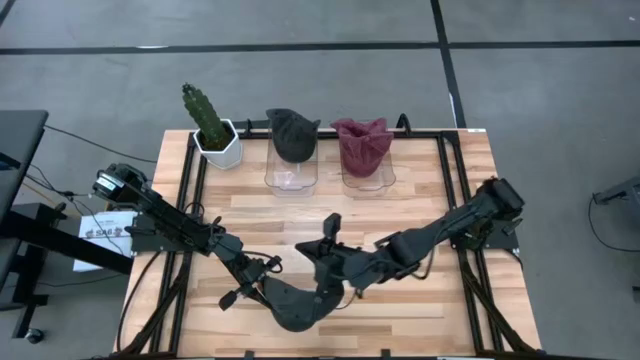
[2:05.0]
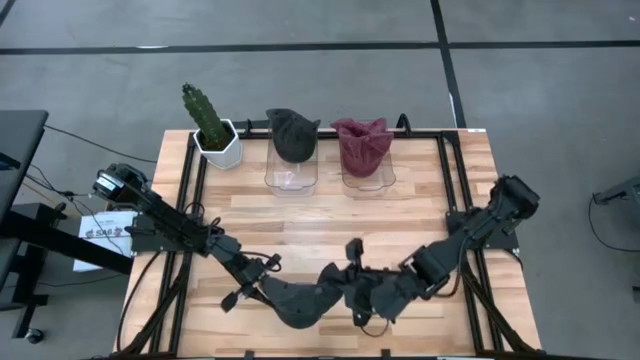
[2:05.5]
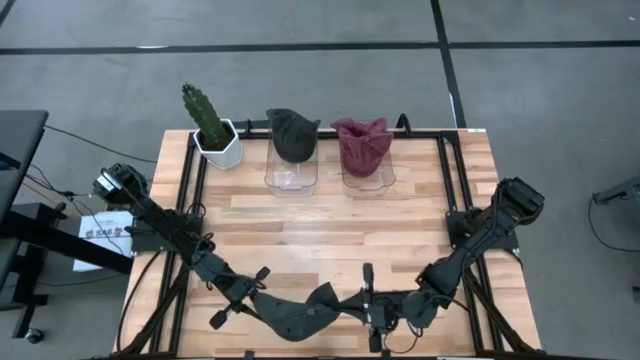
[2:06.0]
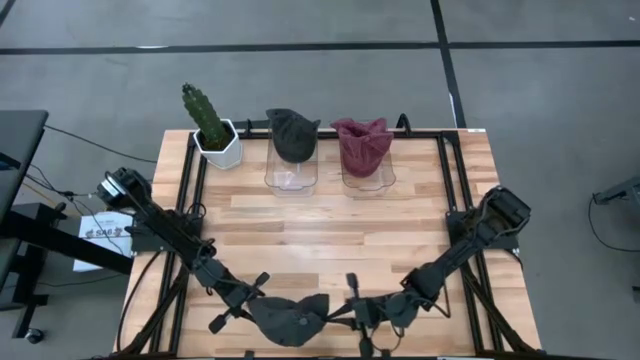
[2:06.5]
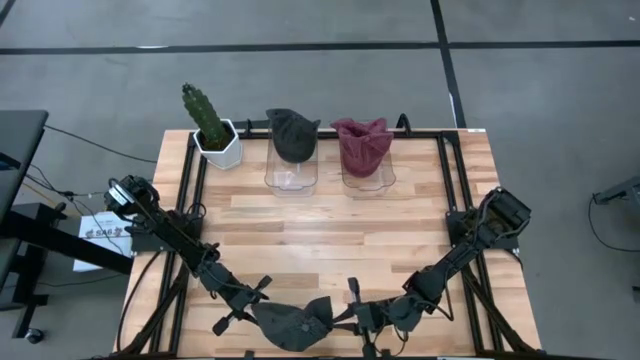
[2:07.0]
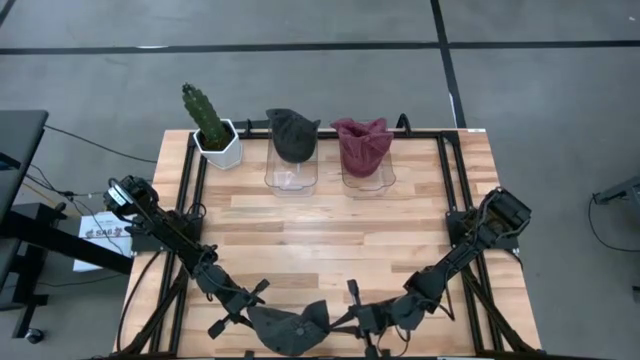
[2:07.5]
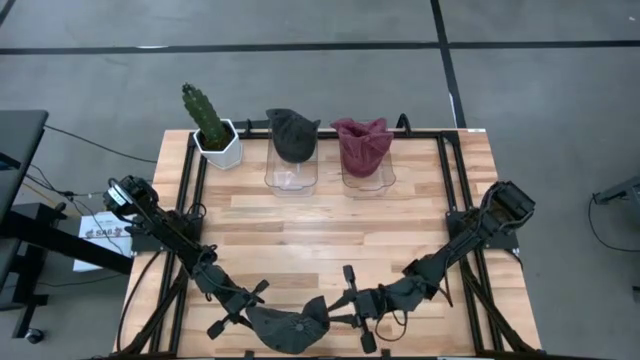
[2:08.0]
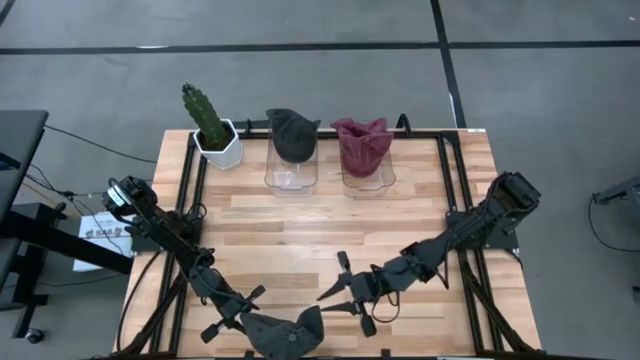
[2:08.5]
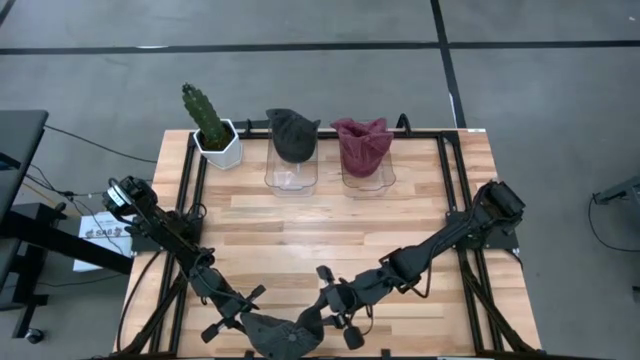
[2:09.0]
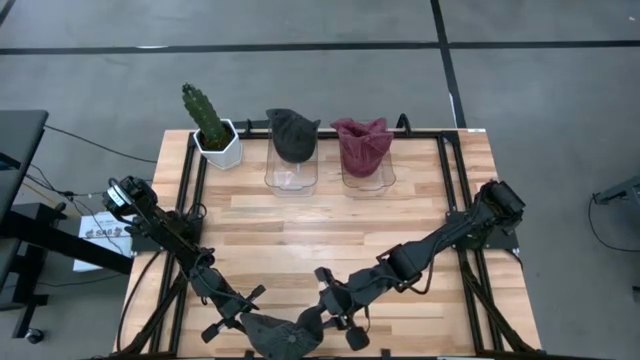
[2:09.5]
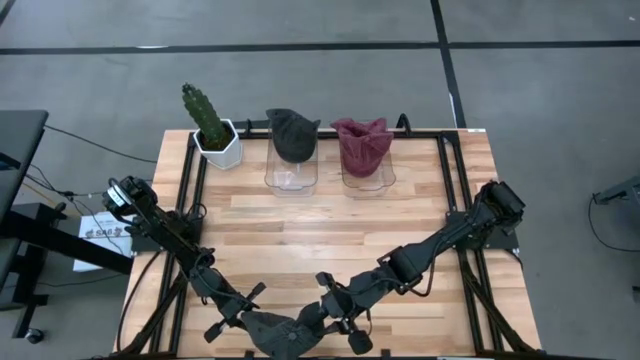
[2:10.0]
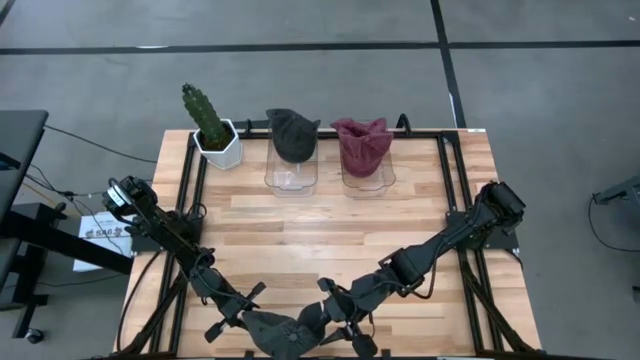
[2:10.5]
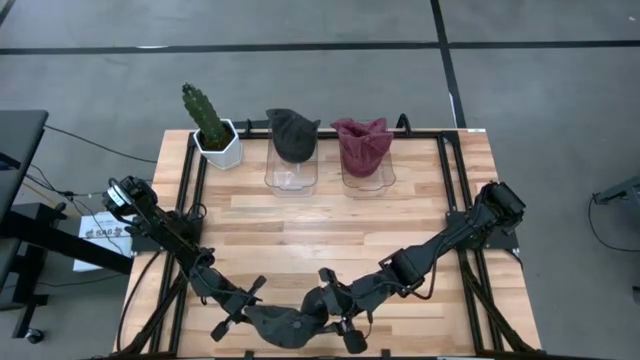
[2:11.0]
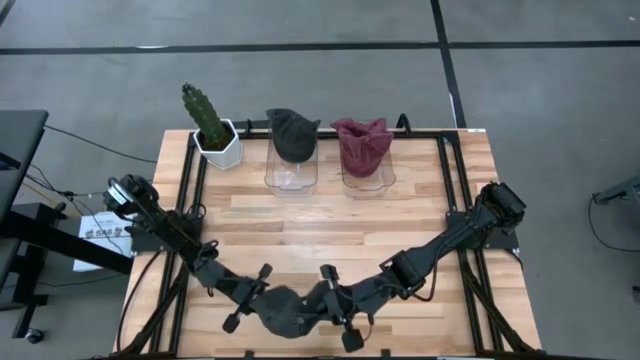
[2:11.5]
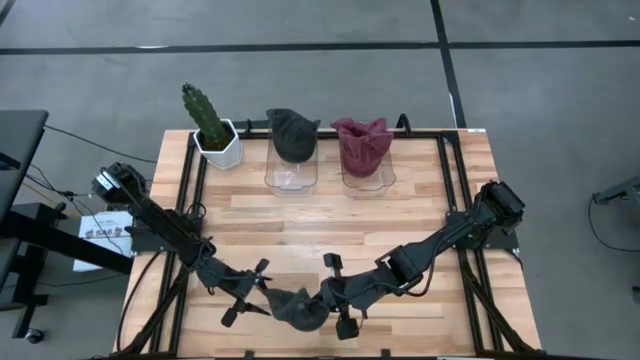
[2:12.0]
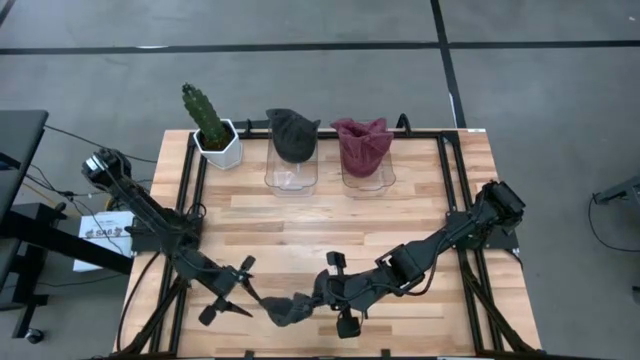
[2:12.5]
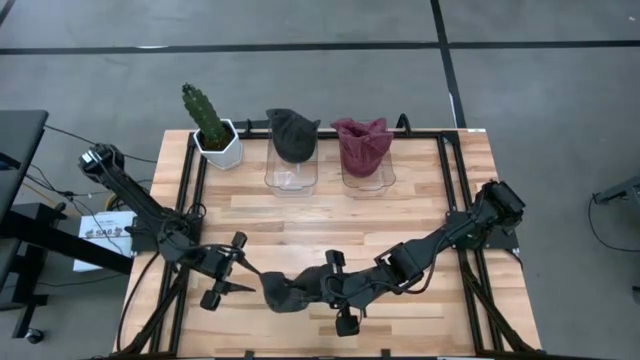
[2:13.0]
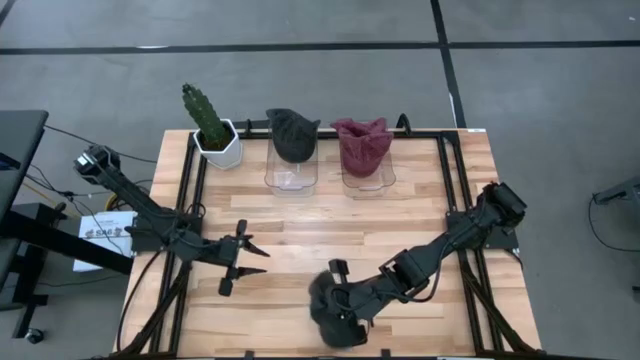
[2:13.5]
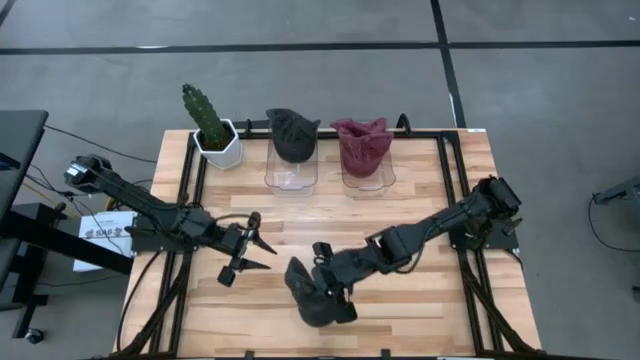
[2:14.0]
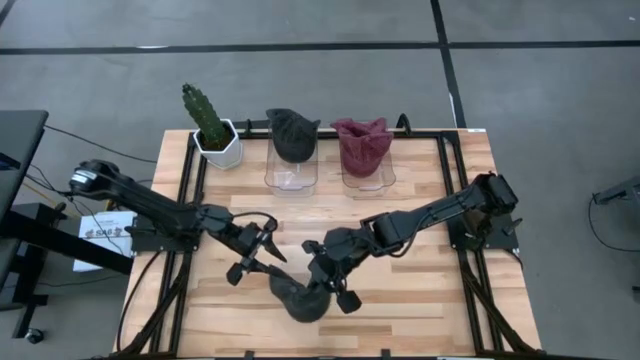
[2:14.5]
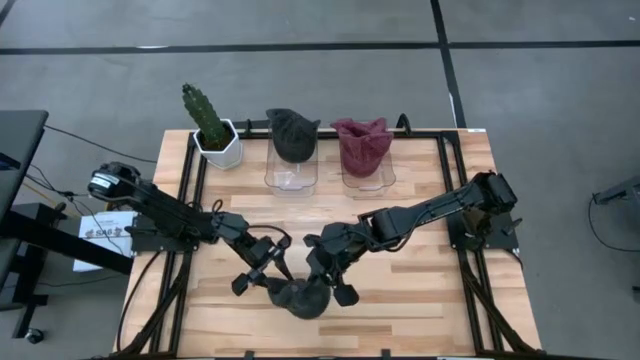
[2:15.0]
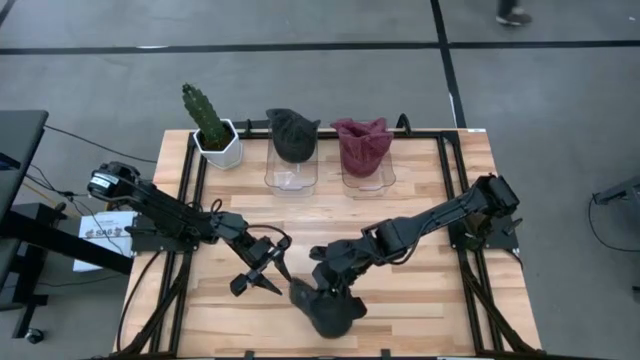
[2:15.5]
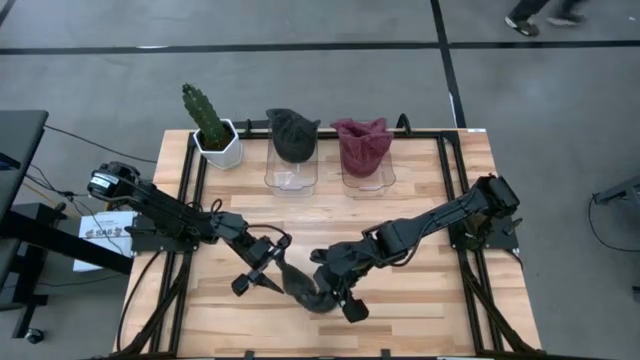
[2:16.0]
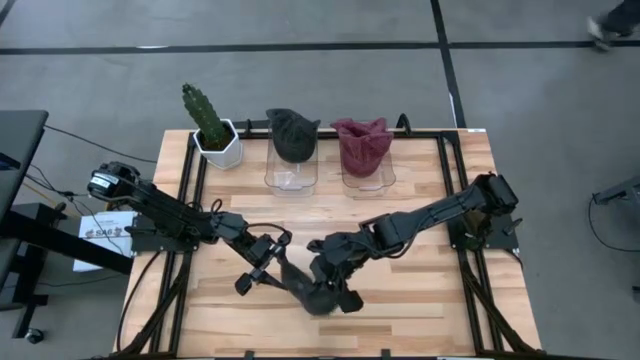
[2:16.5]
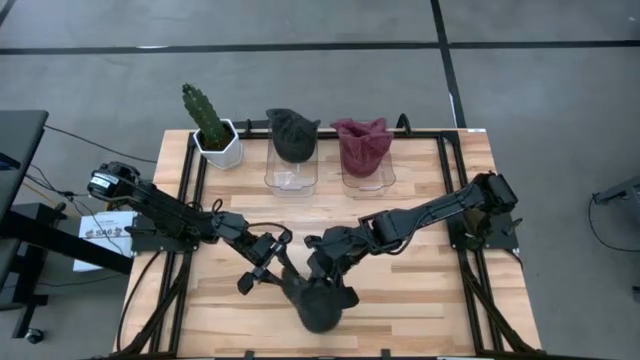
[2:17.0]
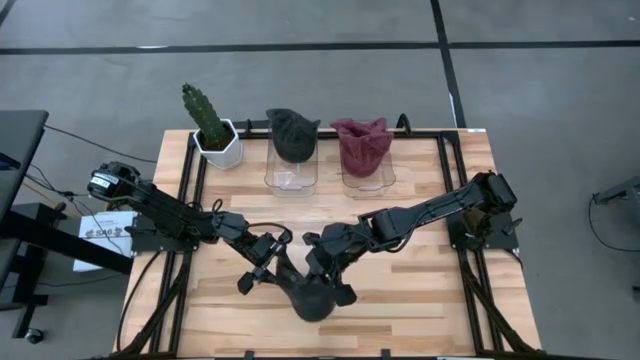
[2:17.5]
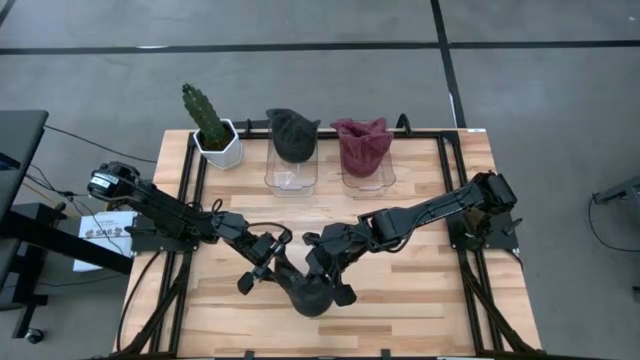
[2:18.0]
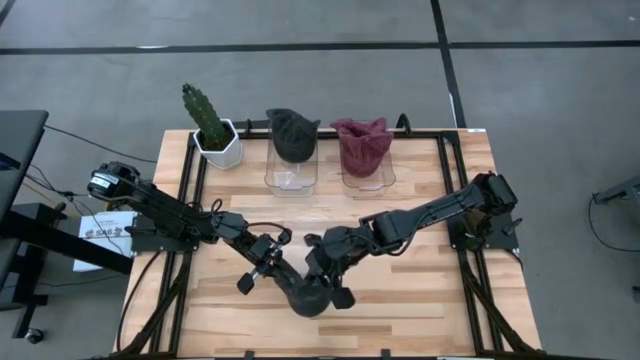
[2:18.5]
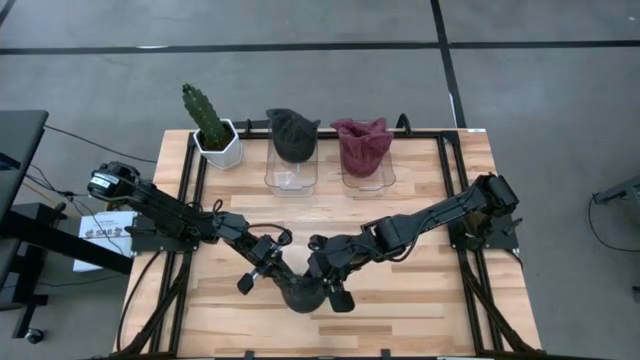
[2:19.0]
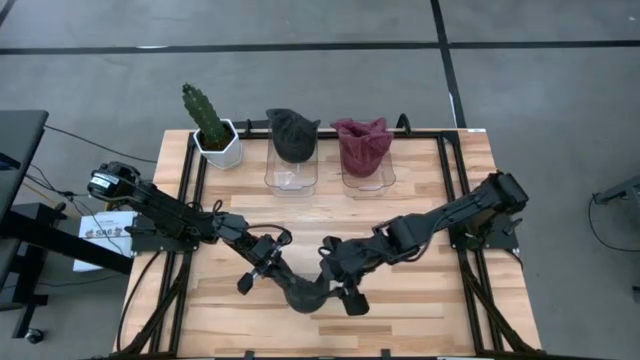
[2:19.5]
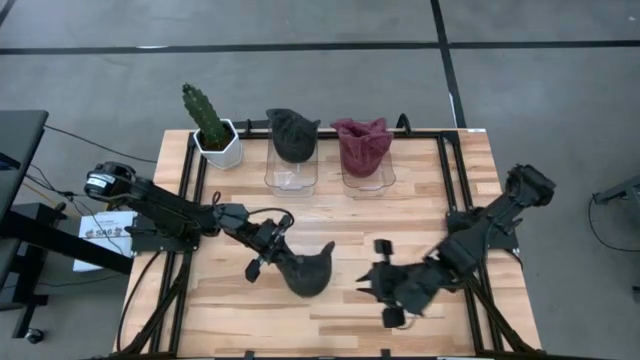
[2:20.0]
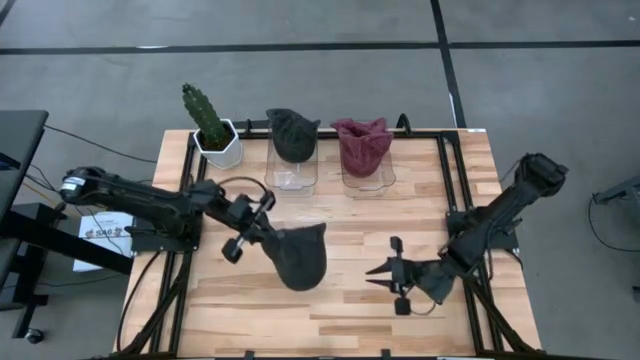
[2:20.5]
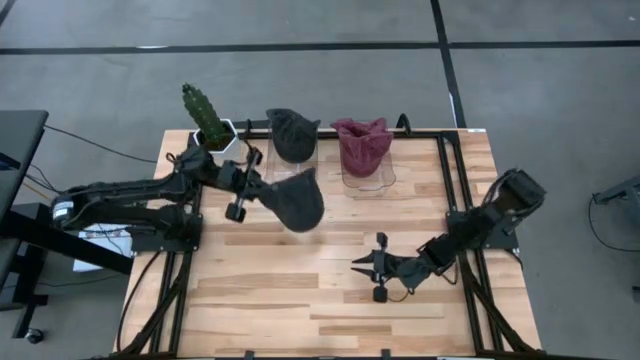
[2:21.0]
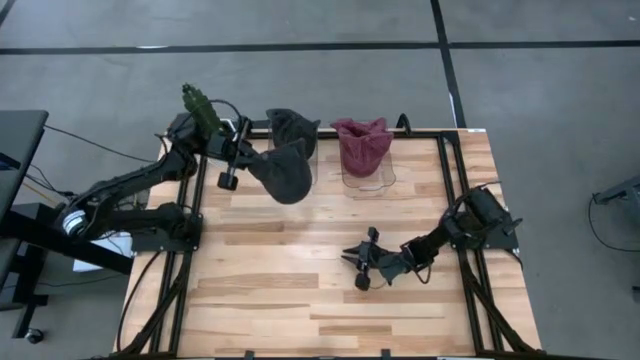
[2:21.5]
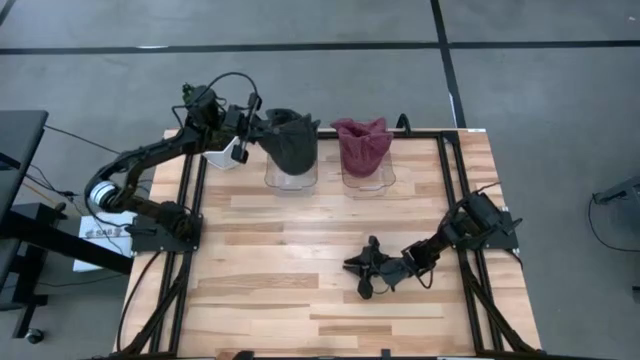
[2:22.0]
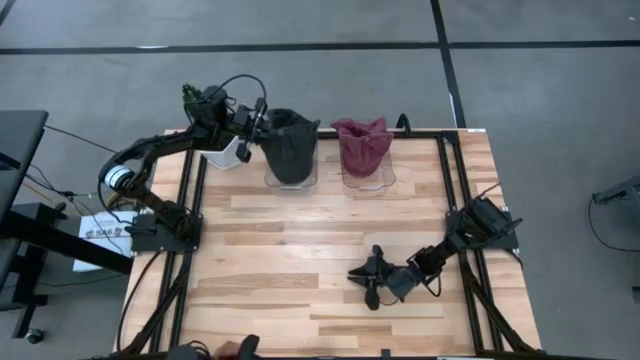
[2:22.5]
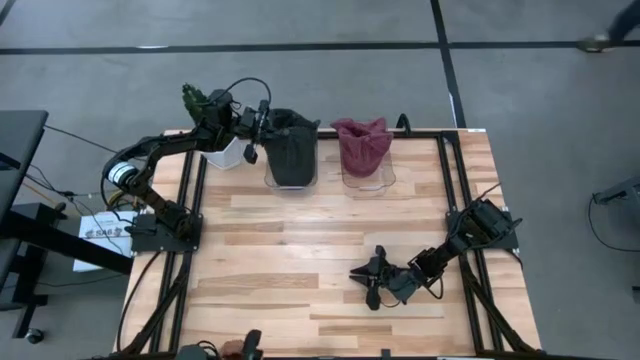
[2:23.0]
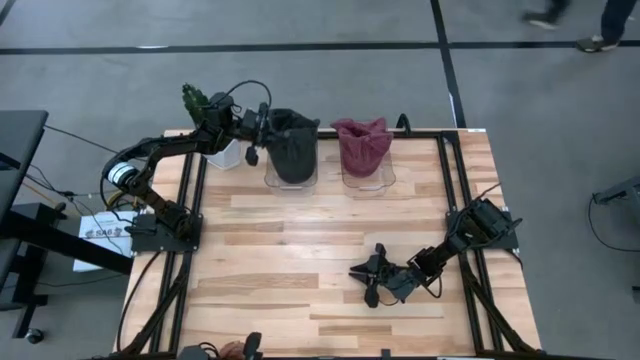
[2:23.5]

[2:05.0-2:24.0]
Task: Pick & Place hat
Put the black cap into the left transparent bin

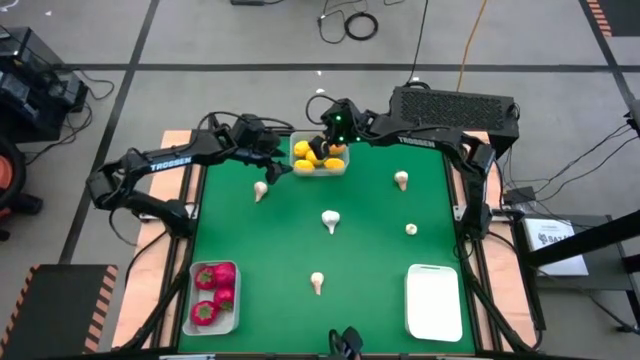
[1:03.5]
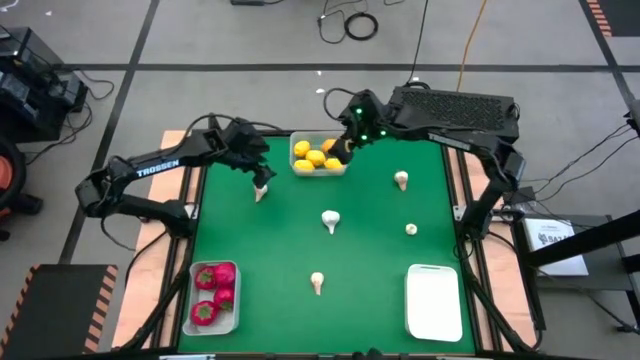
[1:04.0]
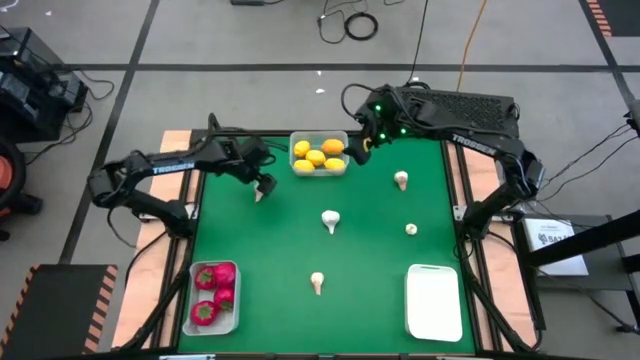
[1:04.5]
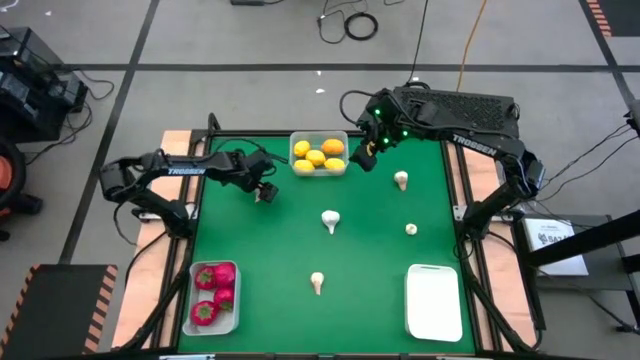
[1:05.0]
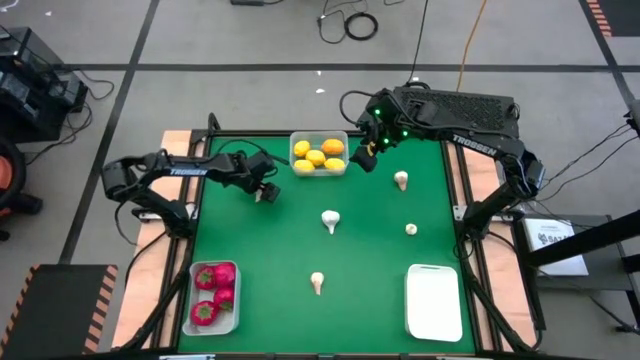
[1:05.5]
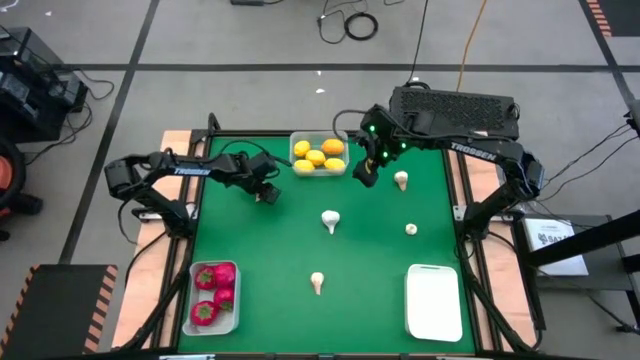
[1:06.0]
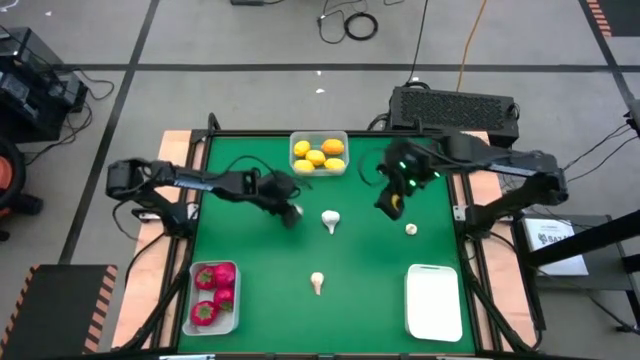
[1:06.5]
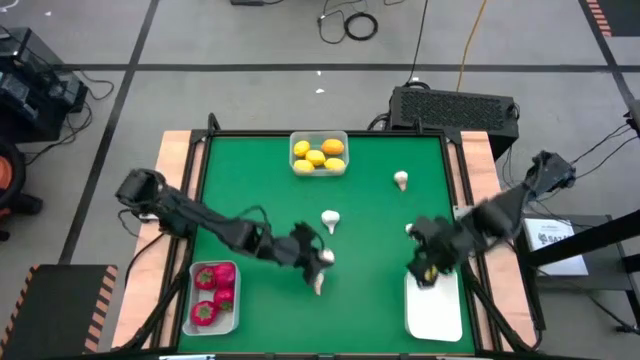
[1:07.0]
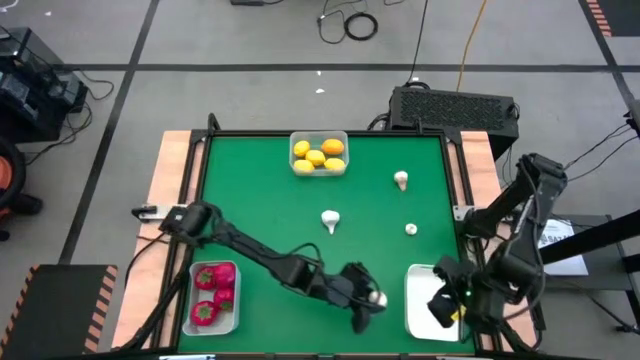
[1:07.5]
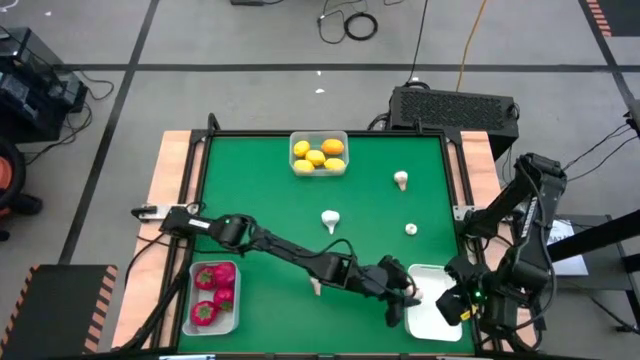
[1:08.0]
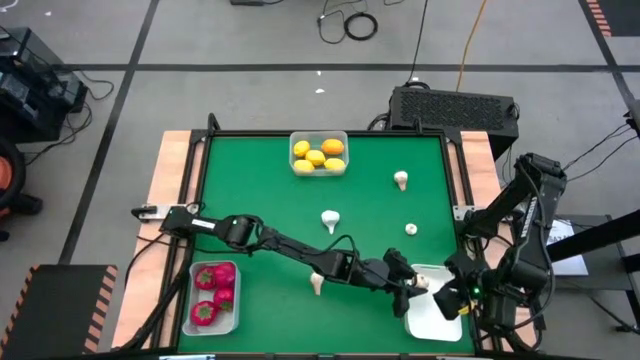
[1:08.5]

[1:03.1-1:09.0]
Task: Sort produce into baskets
Put the garlic into the white bin
